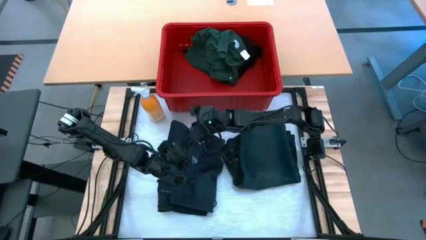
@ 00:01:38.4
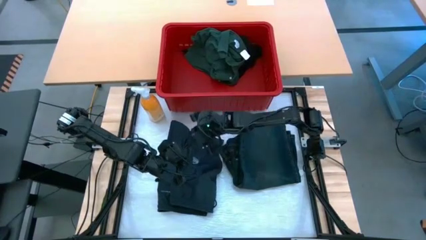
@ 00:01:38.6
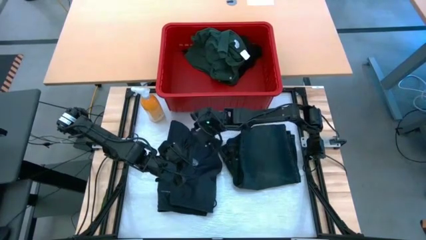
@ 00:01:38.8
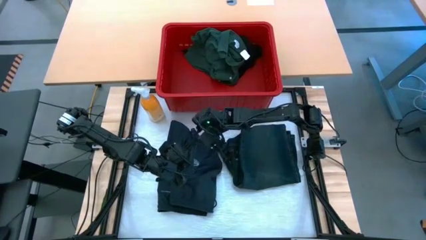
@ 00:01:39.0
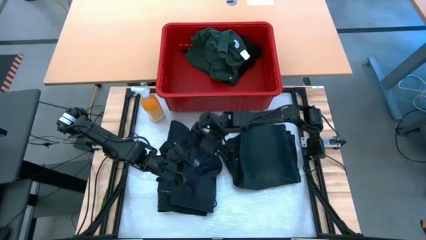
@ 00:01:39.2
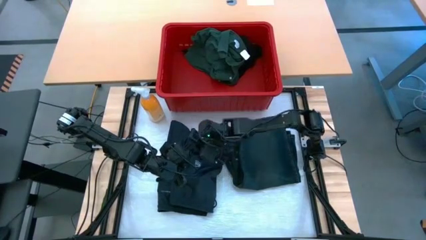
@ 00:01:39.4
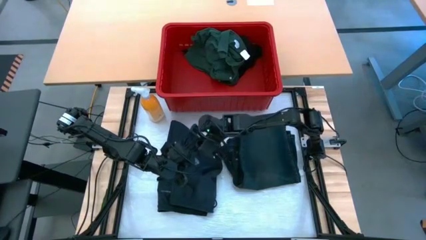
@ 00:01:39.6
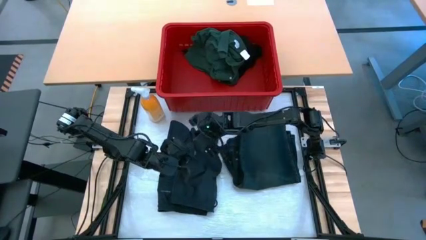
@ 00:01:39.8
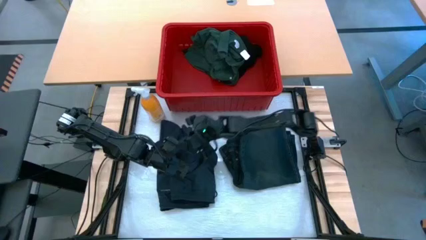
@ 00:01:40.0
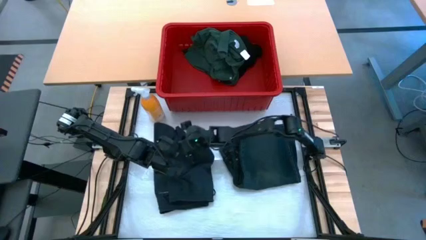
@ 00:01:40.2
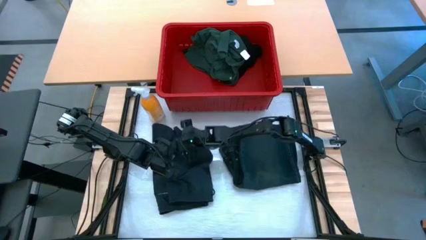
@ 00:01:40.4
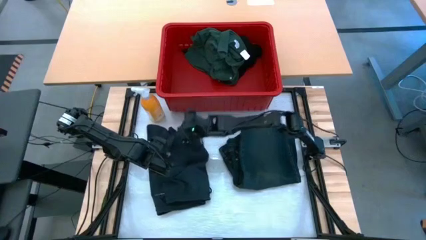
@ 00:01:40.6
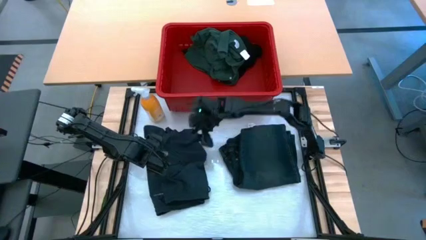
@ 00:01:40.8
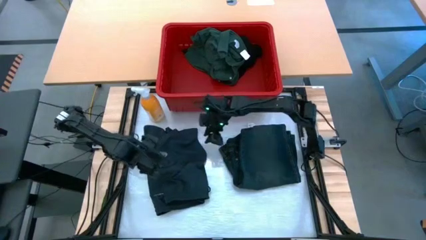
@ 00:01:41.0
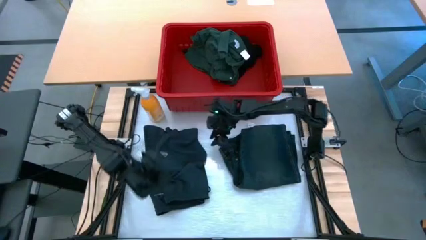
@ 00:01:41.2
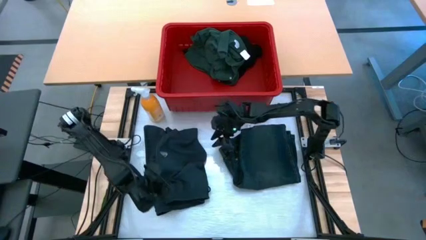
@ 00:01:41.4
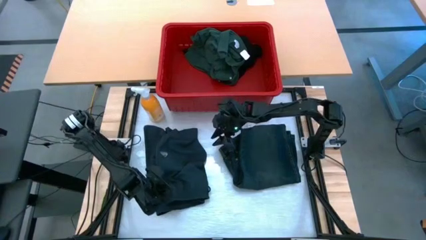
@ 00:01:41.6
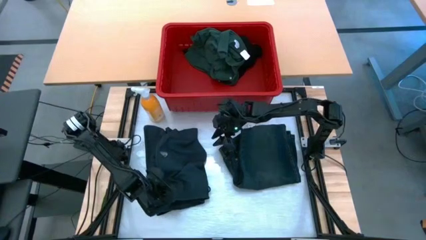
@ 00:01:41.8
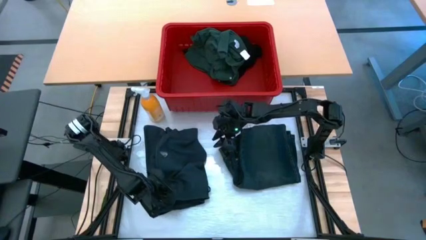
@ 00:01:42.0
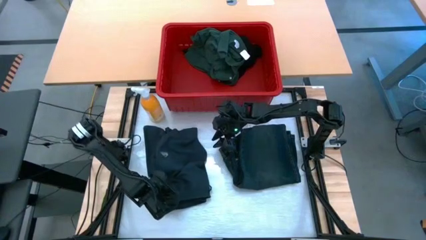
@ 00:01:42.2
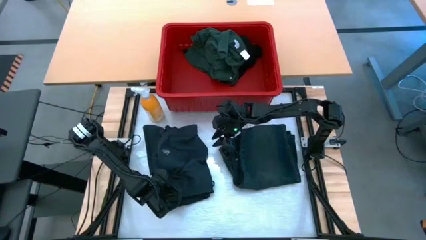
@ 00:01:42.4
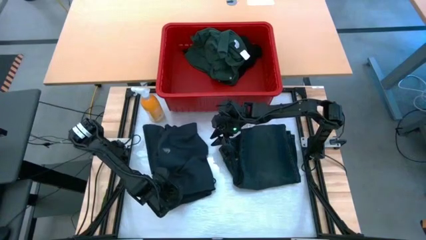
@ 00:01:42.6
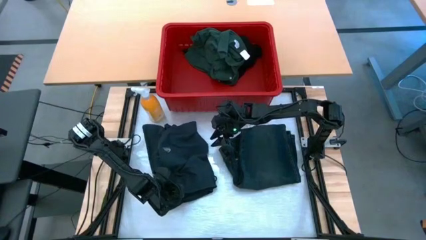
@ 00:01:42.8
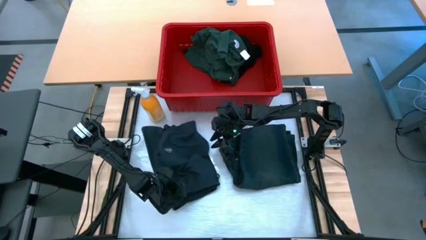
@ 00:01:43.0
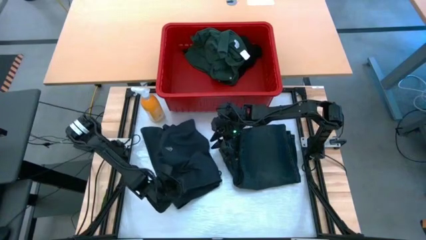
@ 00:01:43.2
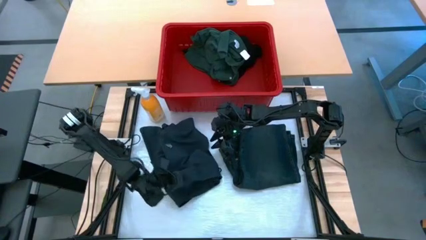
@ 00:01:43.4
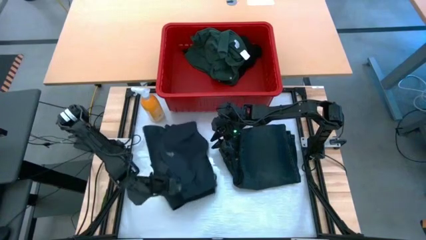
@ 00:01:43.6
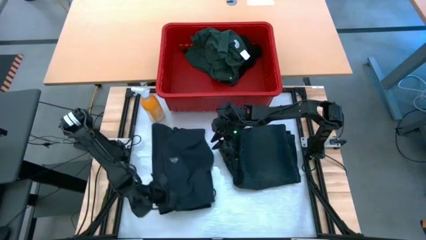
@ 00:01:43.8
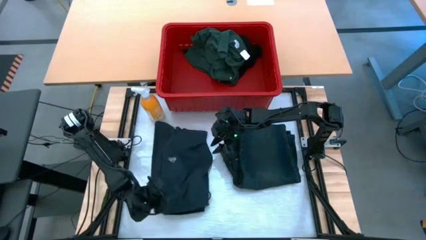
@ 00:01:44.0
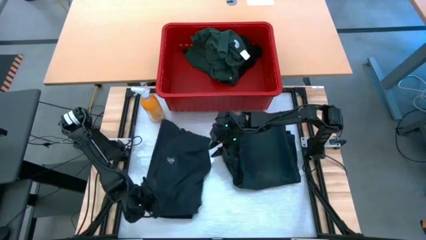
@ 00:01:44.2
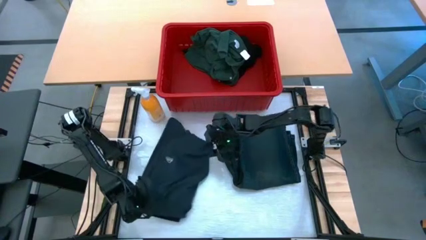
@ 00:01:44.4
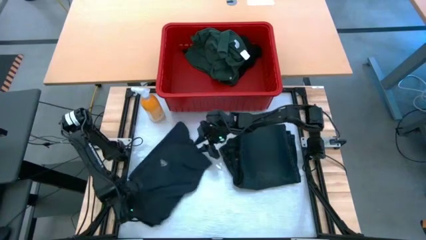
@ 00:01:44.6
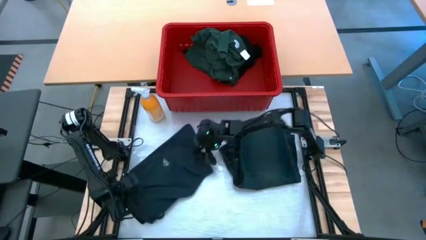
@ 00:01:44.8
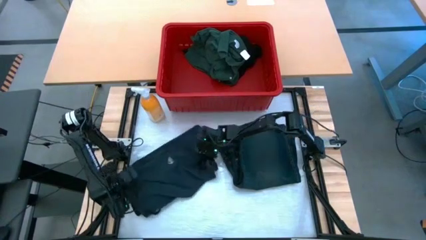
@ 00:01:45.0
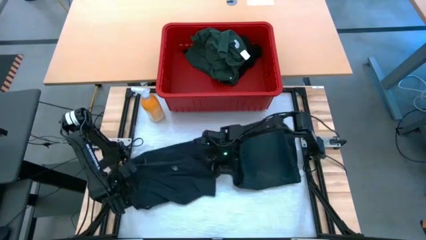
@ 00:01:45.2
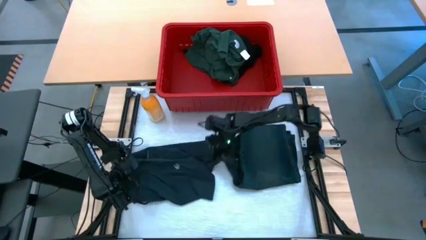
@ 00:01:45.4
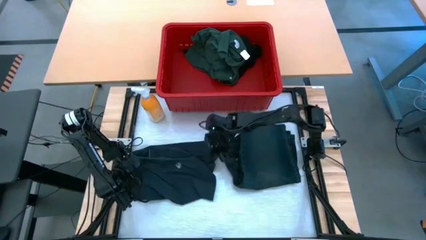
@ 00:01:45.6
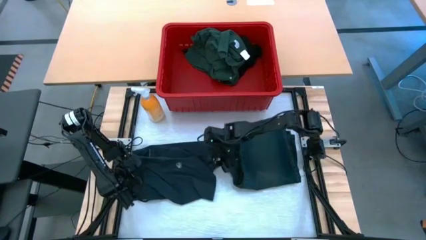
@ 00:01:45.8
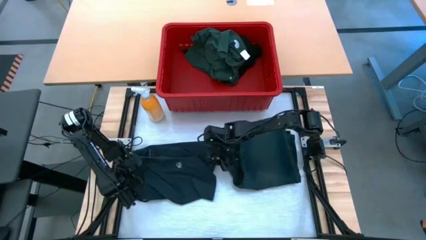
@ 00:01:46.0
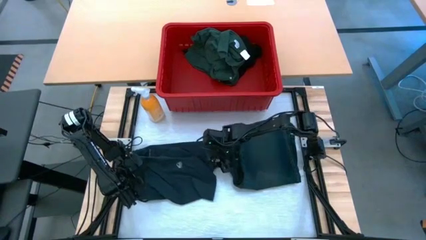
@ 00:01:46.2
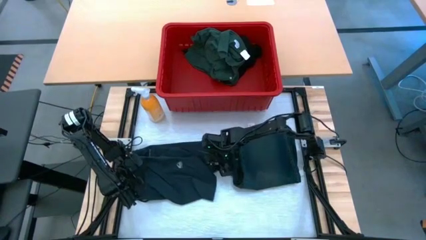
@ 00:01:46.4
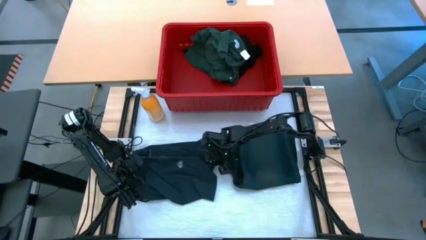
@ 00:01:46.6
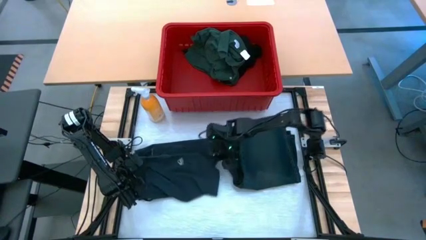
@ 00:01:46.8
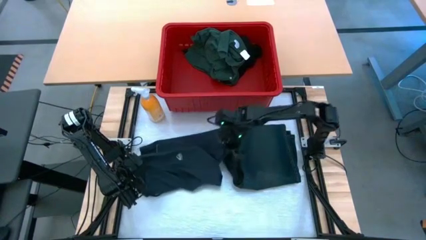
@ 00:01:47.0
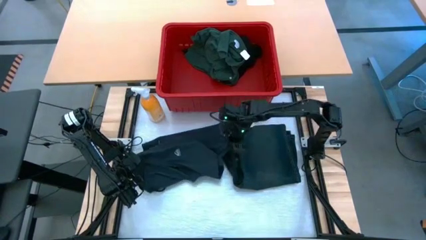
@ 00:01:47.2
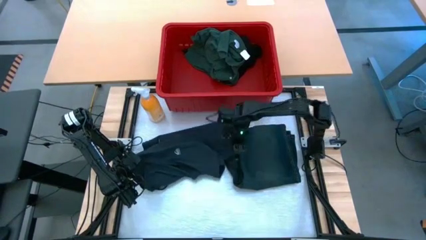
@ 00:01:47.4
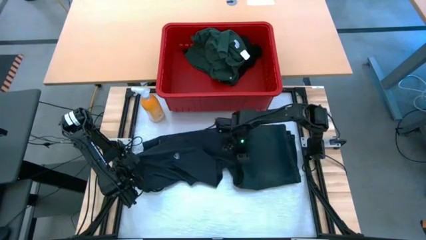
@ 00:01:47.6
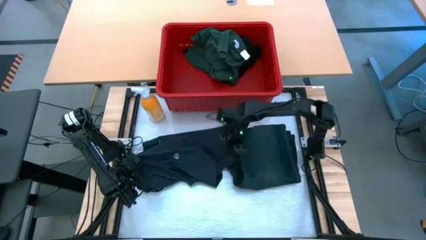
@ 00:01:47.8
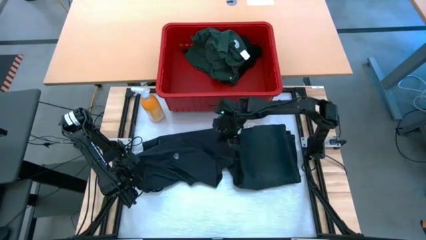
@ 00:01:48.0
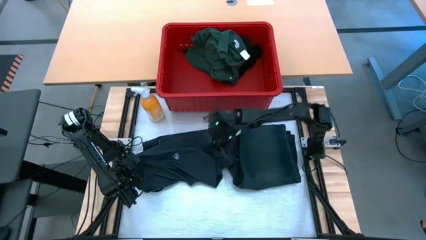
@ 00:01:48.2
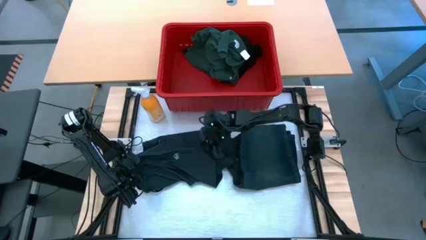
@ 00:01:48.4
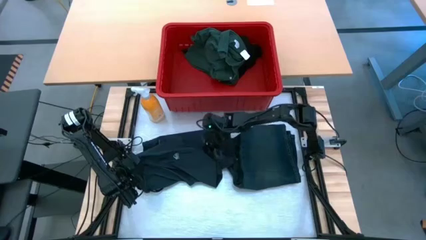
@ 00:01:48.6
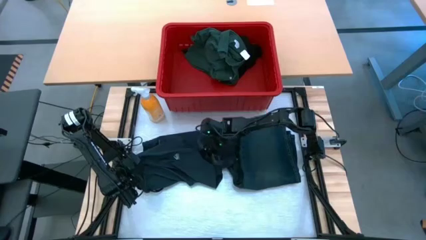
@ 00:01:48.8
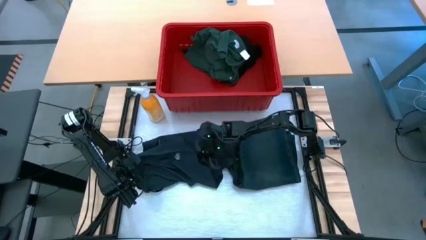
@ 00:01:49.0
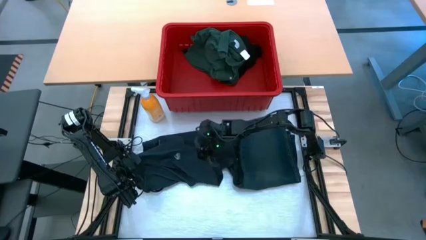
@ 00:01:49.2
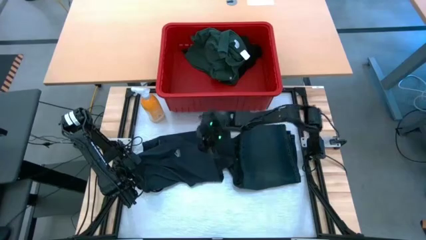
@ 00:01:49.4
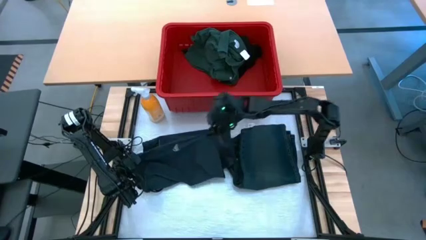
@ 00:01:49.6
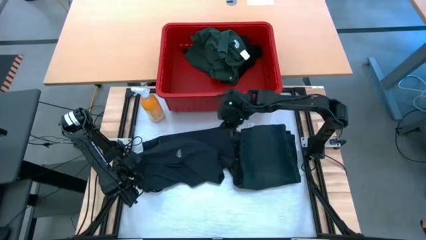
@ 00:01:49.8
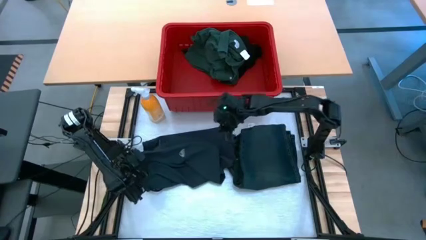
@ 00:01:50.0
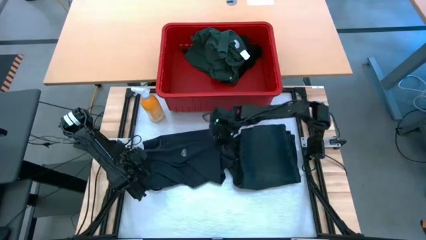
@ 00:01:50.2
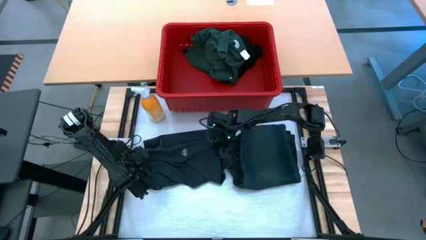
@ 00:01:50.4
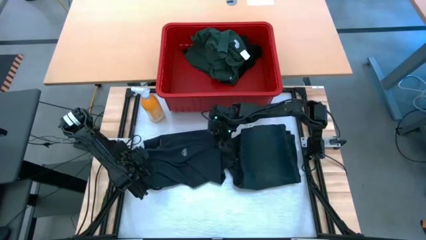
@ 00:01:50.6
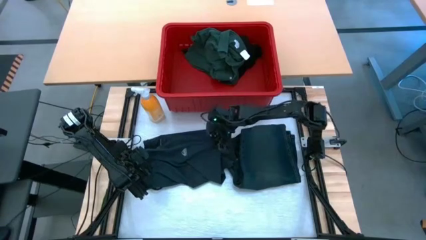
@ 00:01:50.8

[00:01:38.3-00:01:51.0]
Task: Fold laundry
Fold the black shorts

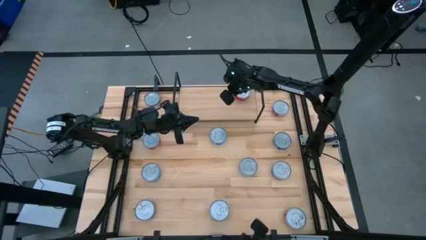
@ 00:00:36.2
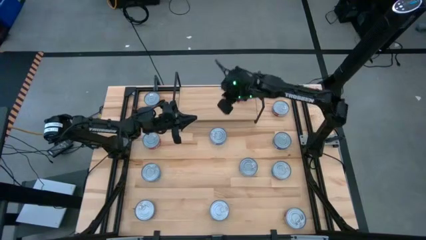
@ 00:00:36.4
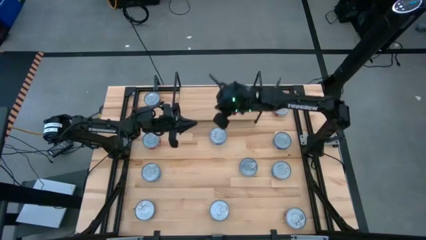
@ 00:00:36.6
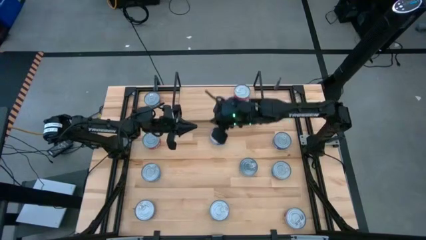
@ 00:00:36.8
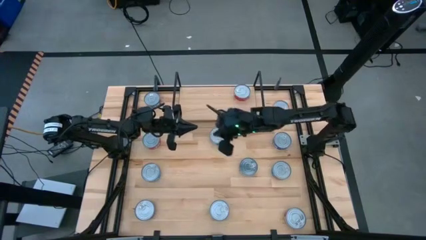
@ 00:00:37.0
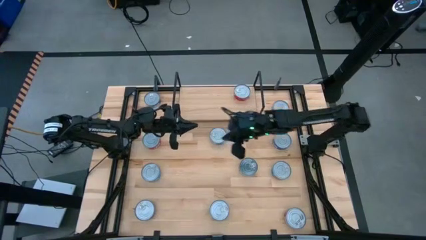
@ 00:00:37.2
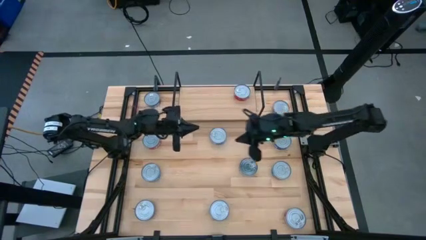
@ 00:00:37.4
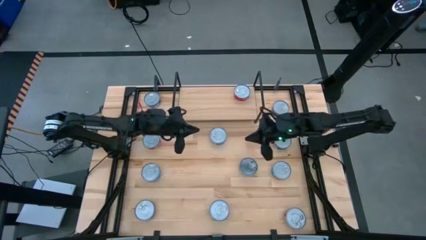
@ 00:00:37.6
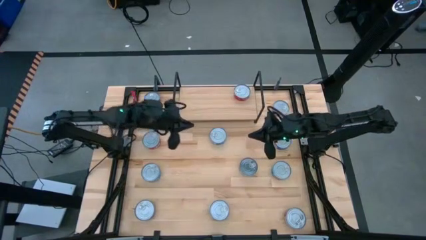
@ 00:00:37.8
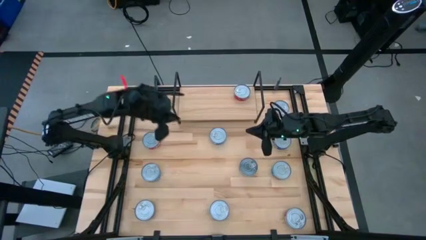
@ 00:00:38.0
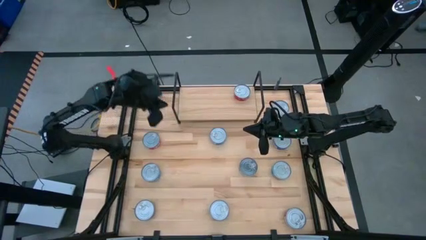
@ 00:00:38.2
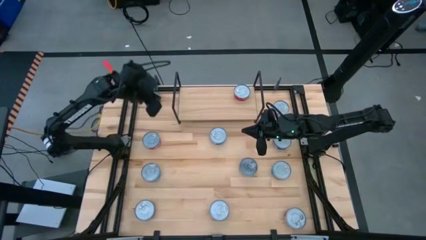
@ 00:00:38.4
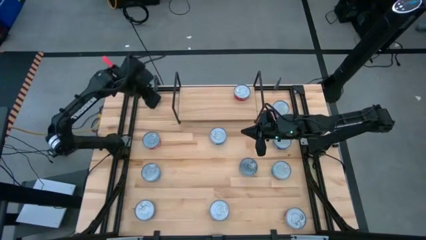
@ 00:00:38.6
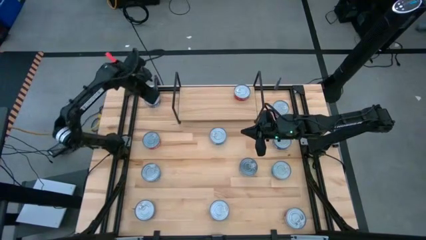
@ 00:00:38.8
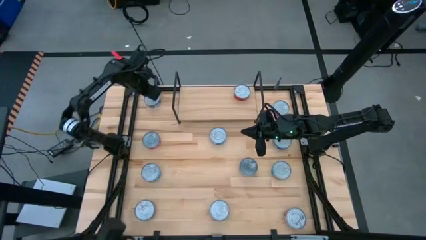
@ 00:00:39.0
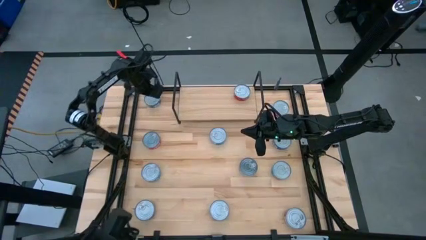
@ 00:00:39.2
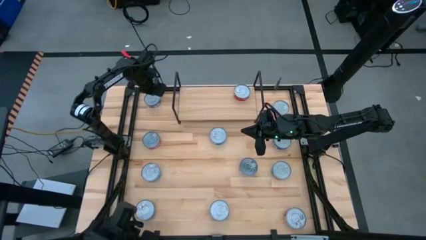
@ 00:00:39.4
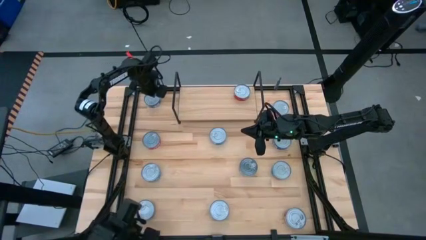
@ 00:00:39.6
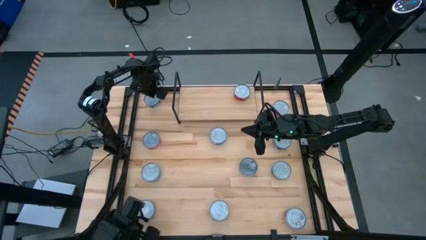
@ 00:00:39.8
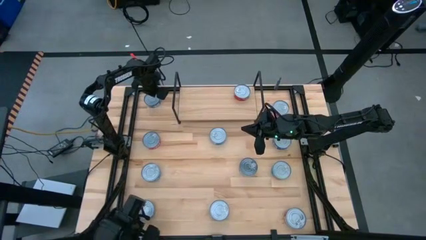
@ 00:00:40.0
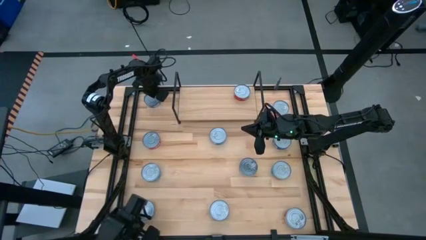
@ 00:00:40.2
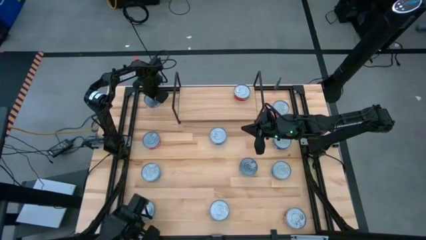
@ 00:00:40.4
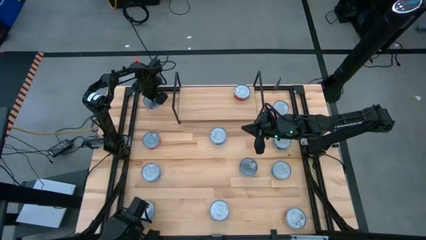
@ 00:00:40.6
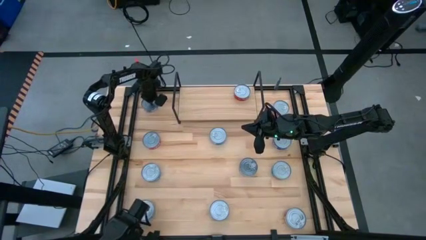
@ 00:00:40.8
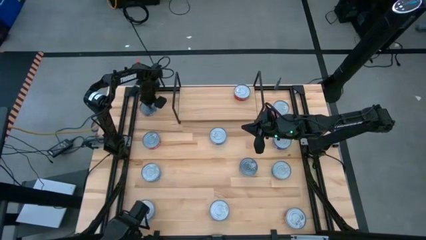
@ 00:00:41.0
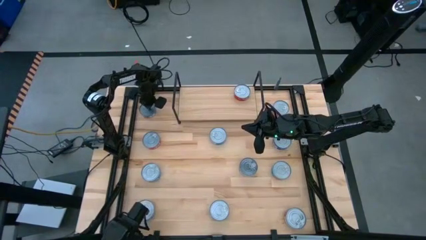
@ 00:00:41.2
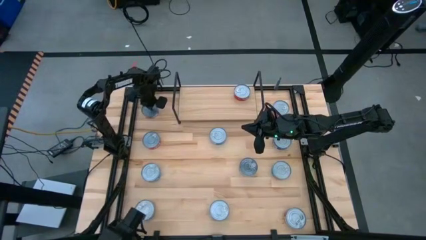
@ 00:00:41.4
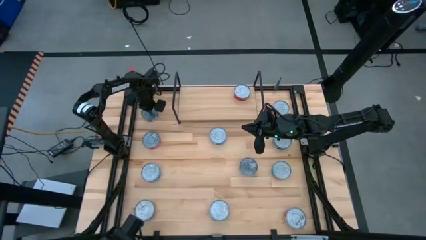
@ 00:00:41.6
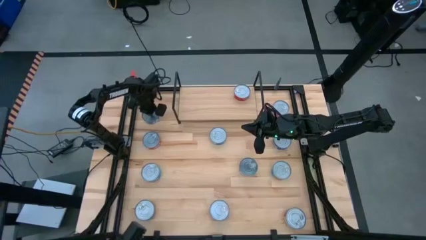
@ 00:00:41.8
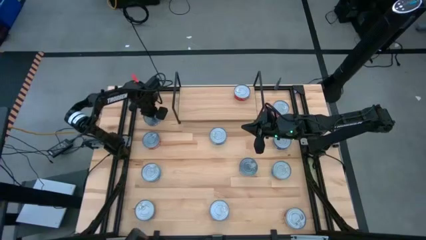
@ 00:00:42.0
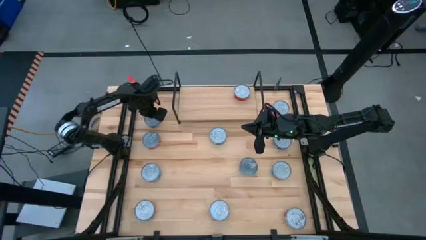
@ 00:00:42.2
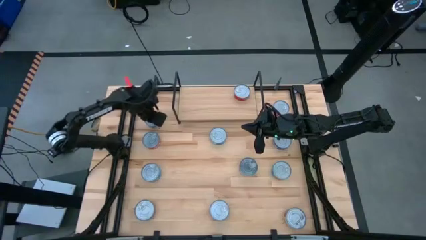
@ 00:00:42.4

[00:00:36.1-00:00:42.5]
Task: Stack canned seafood by type on shelf
Move the top left blue tuna can to the center of the table
